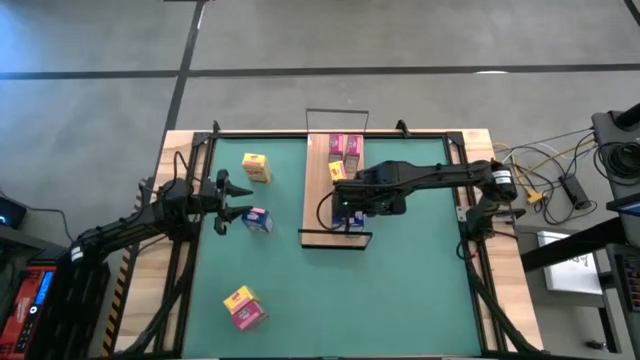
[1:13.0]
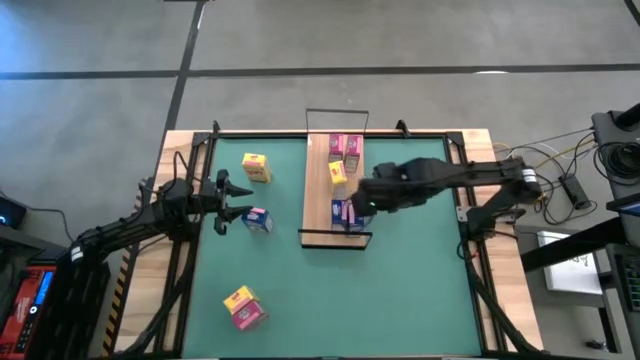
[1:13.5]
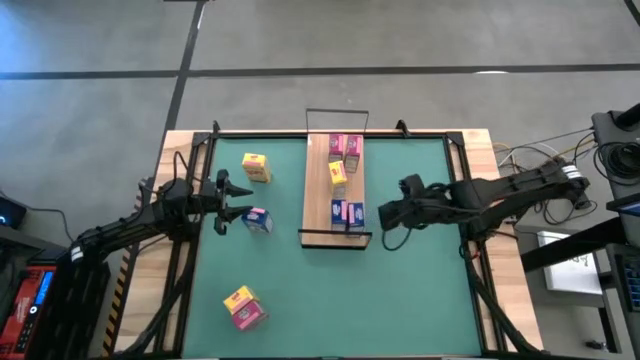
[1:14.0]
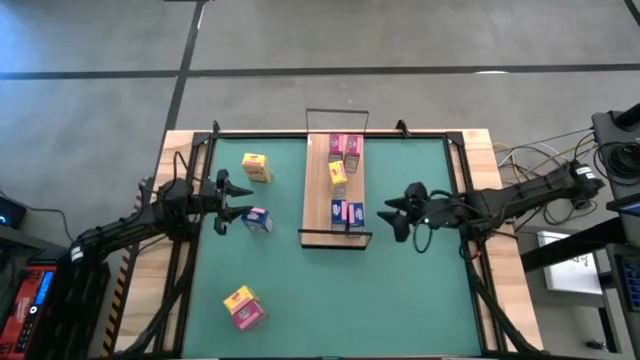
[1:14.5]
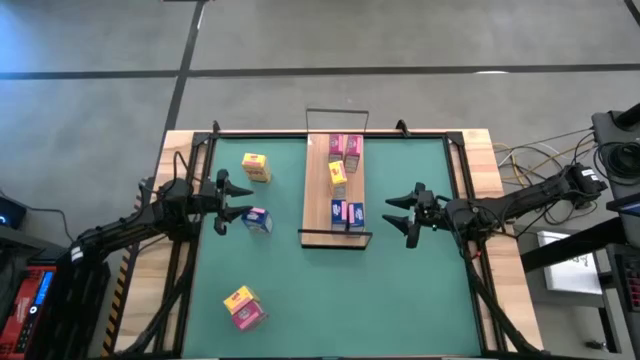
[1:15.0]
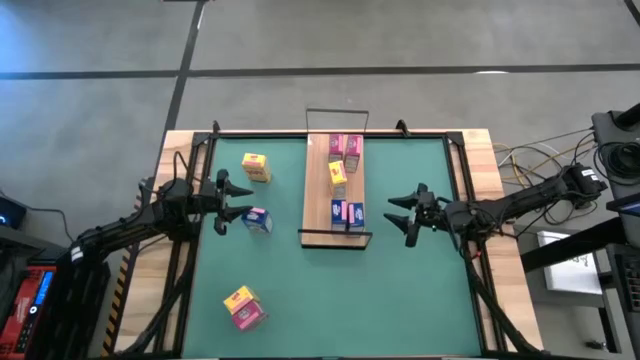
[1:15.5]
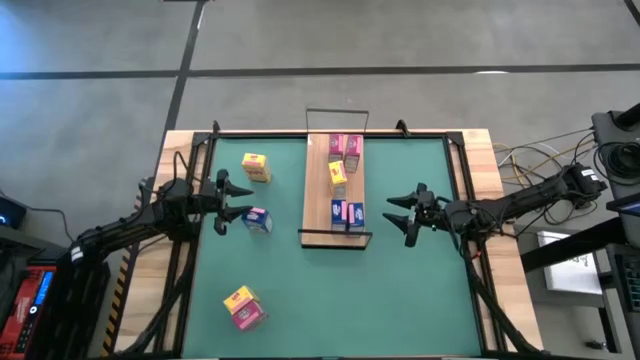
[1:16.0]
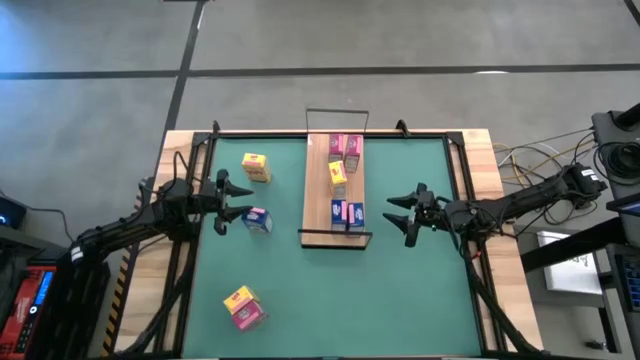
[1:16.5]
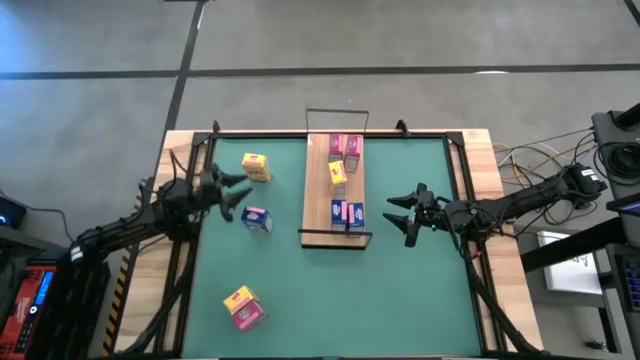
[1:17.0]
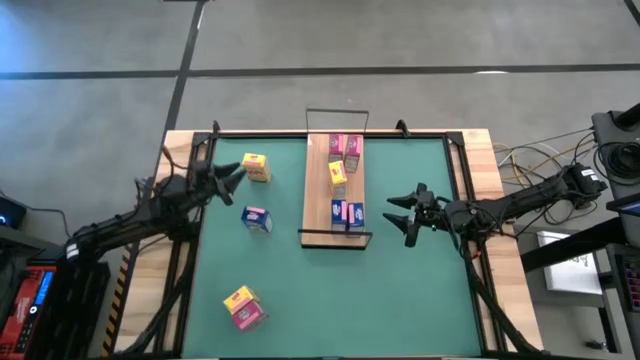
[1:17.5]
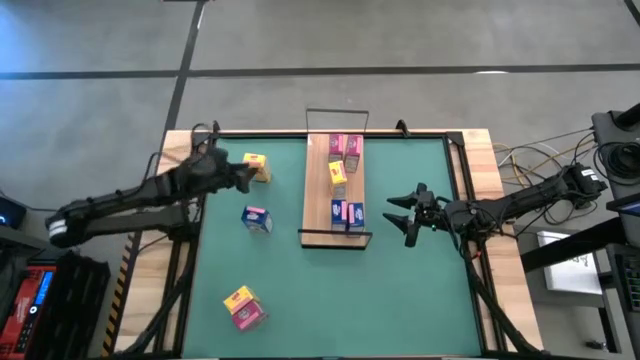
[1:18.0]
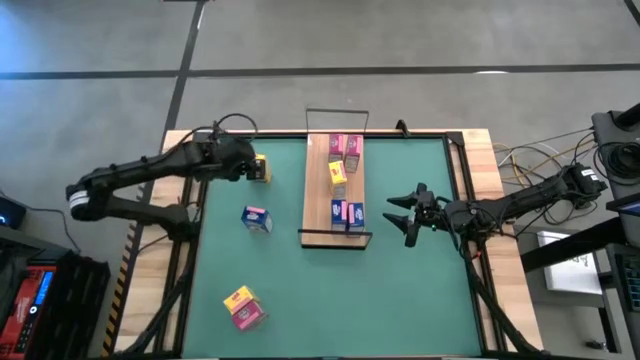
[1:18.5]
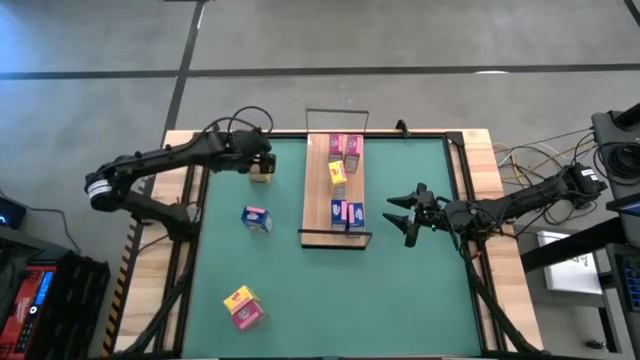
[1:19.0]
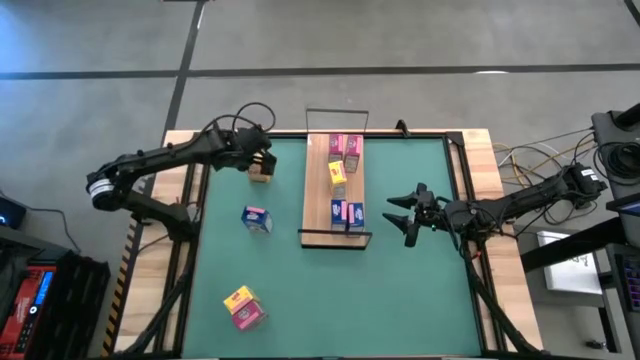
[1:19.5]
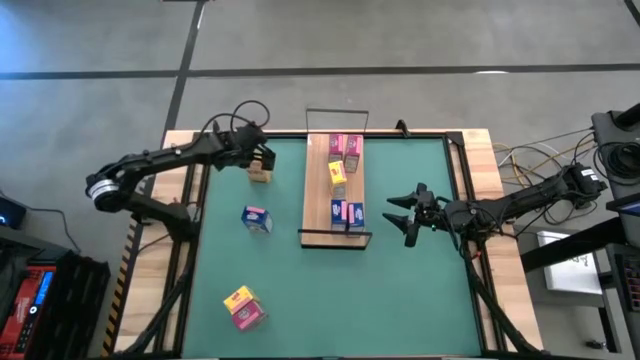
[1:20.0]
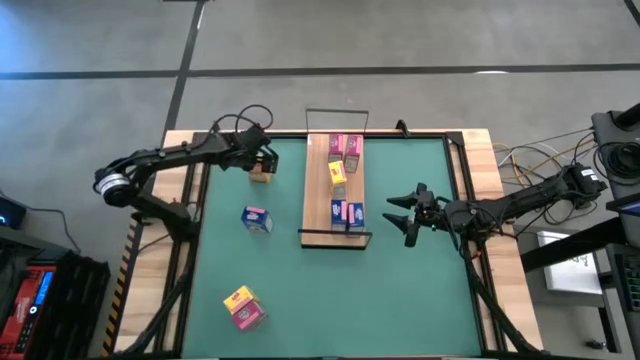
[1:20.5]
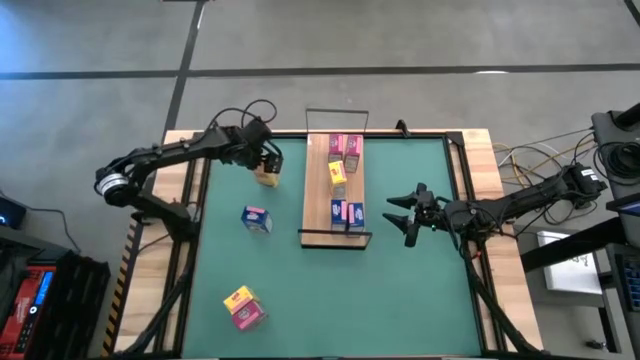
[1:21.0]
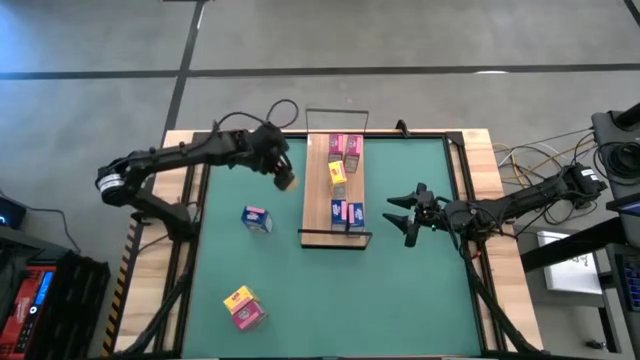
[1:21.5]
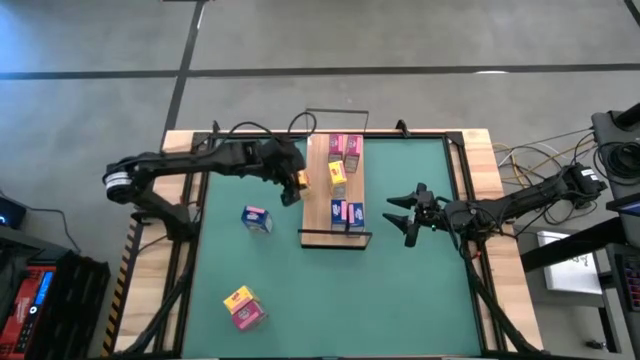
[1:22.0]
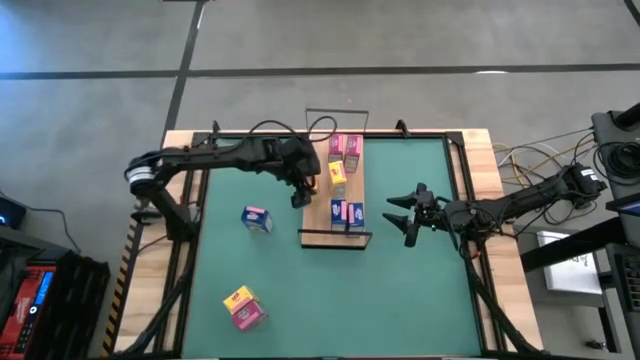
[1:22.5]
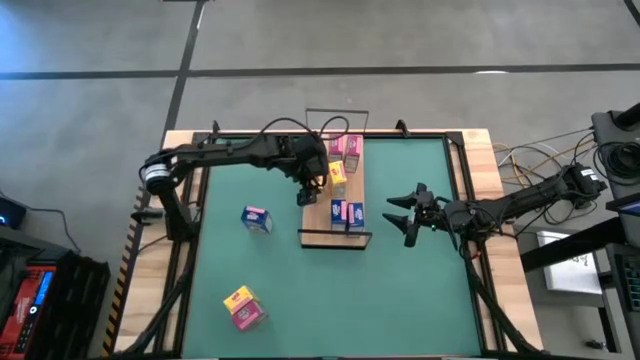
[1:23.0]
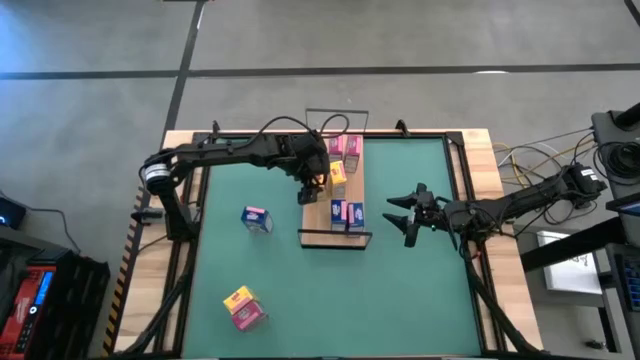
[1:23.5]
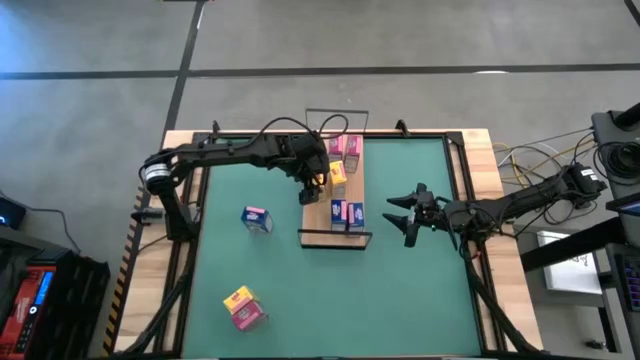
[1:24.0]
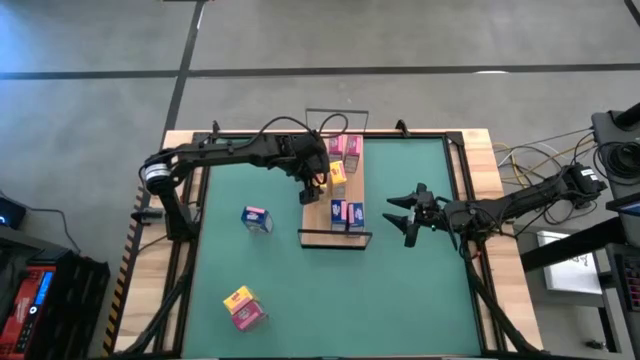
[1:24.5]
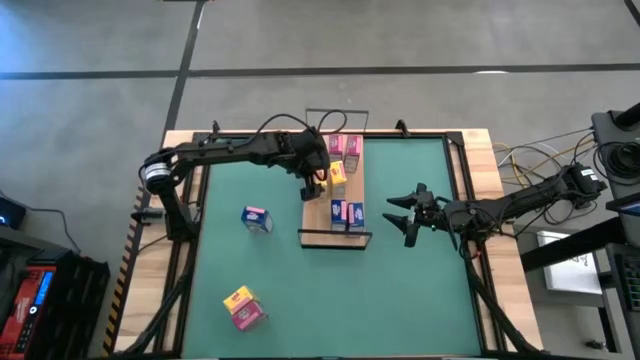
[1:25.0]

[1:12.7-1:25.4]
Task: Stack cereal on shelf
Put the top yellow cereal box on the shelf

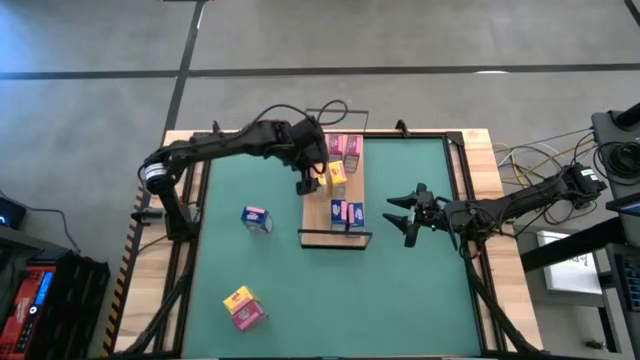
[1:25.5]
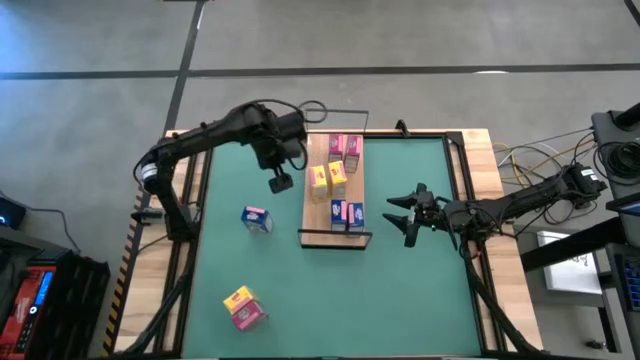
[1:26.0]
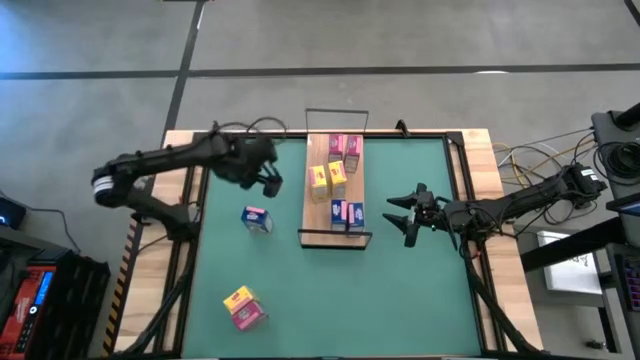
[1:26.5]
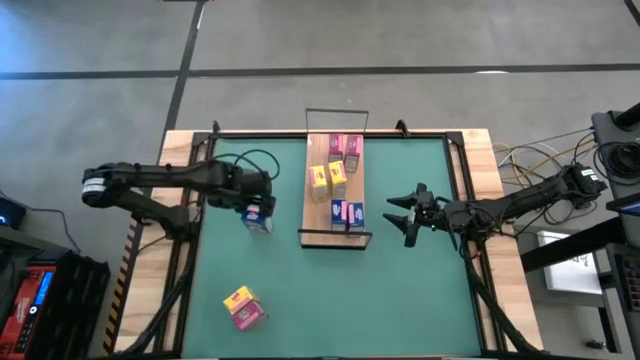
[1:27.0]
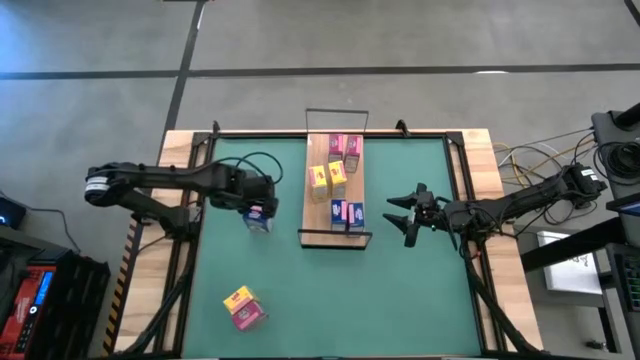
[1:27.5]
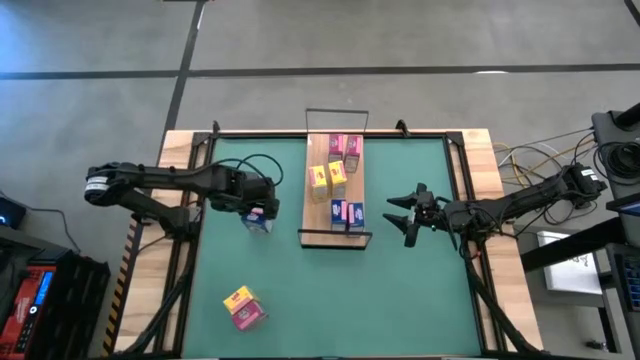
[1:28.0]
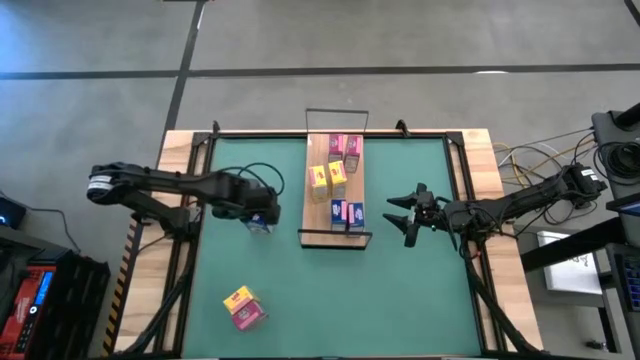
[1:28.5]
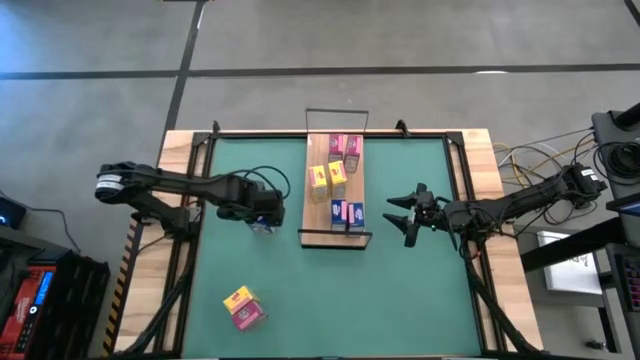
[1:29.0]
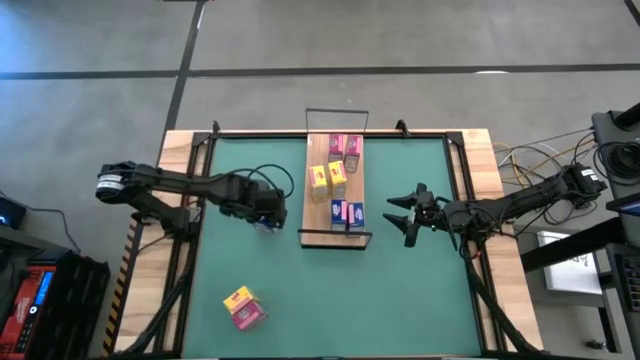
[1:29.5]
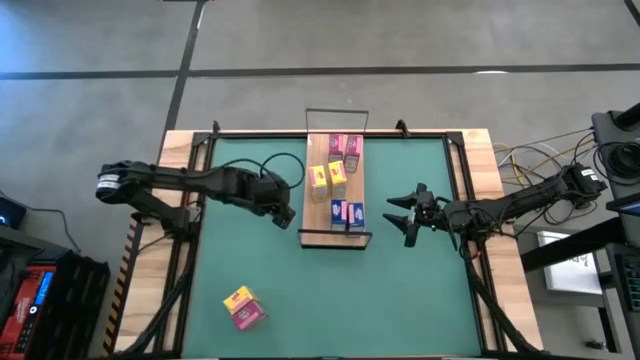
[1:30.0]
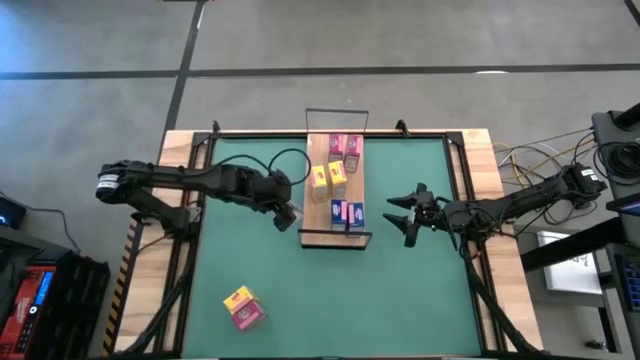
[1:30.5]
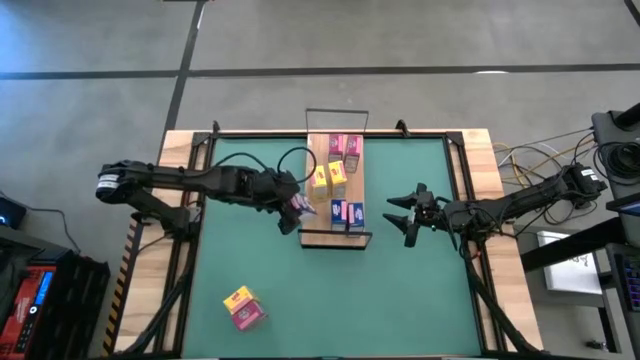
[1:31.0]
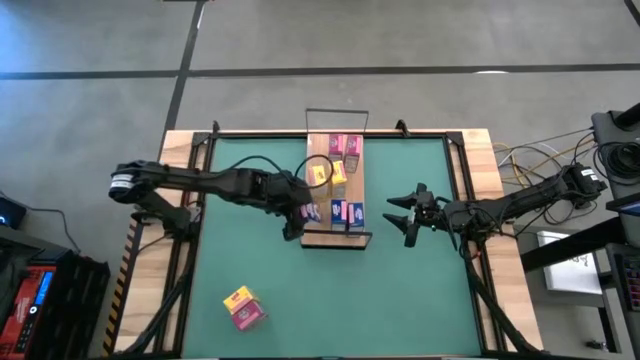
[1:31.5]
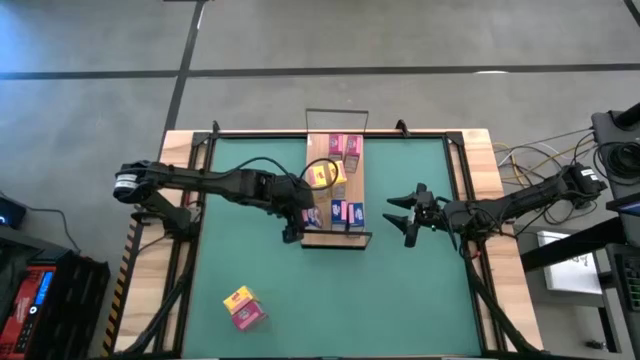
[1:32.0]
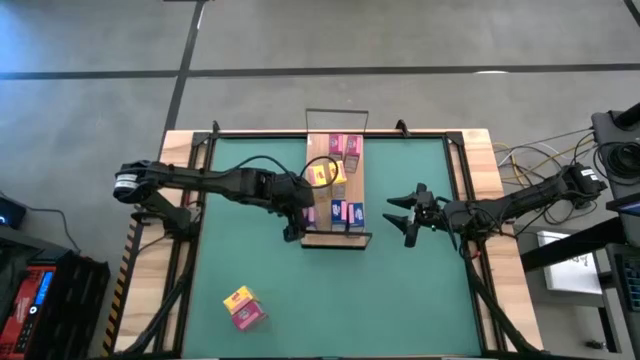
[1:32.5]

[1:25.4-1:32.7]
Put the blue cereal box on the shelf

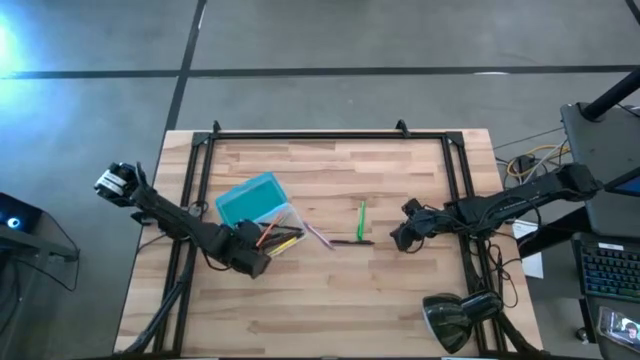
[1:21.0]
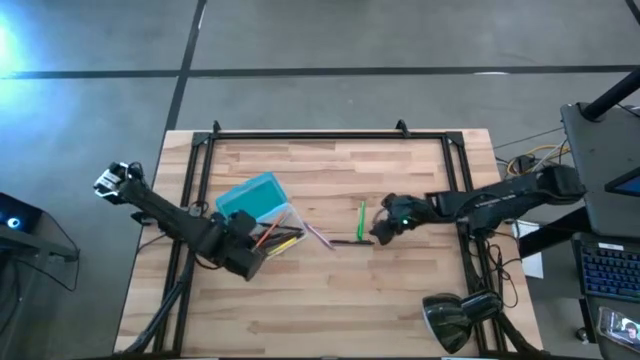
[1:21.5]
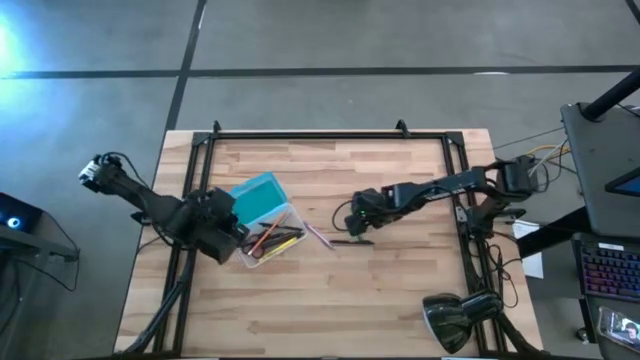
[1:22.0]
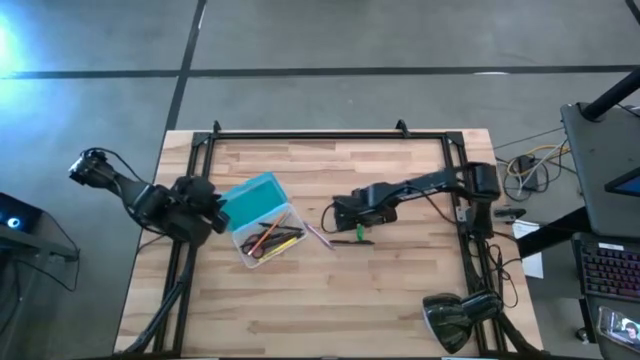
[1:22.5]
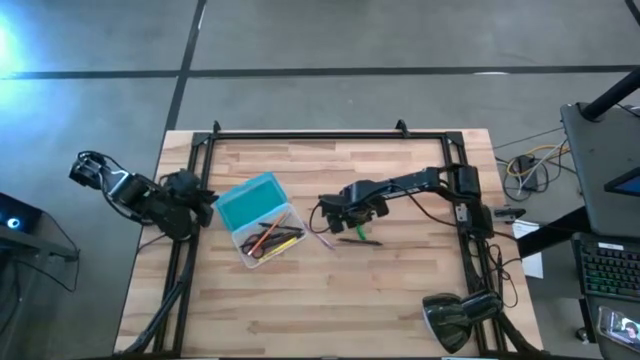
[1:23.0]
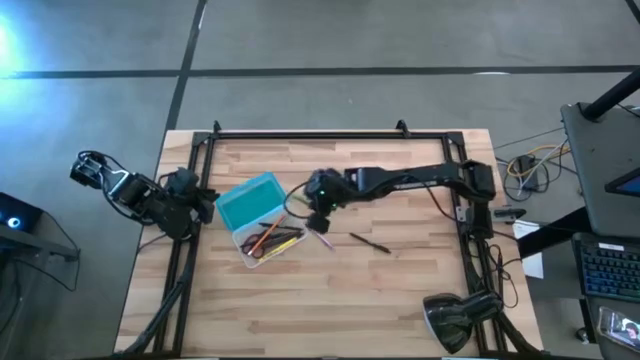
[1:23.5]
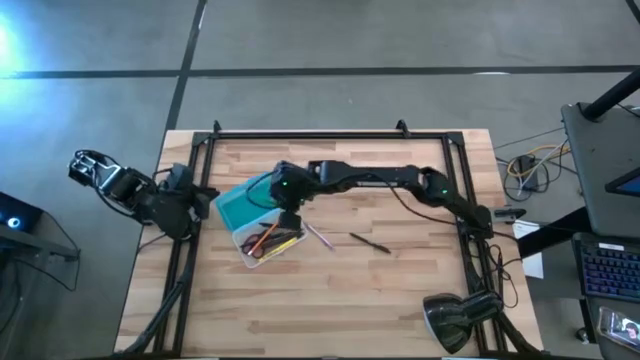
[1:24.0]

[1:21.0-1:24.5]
Task: Pick & place school supplies into a supply box
Put the green pen into the blue supply box
